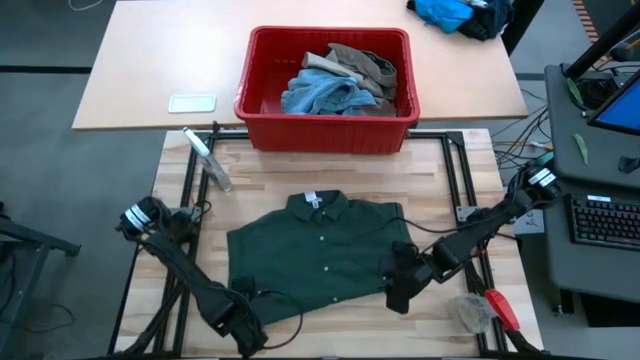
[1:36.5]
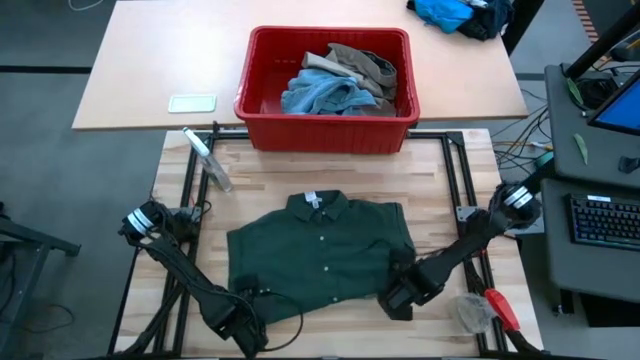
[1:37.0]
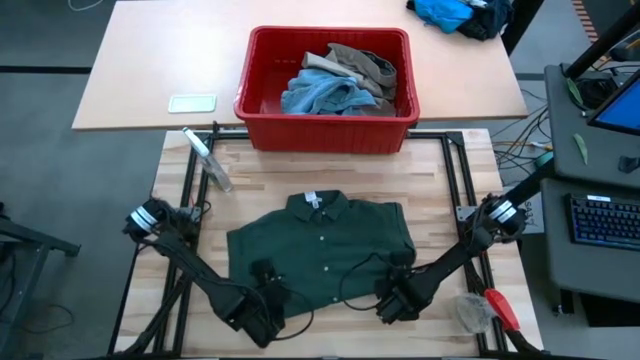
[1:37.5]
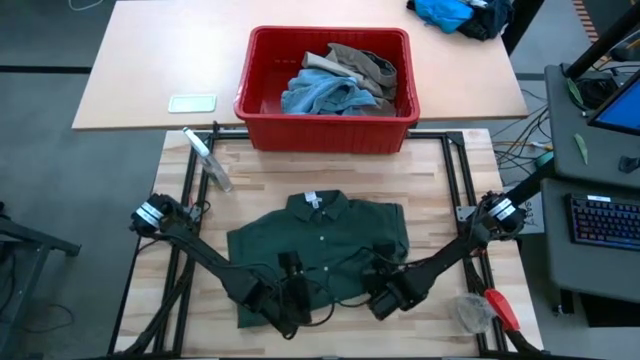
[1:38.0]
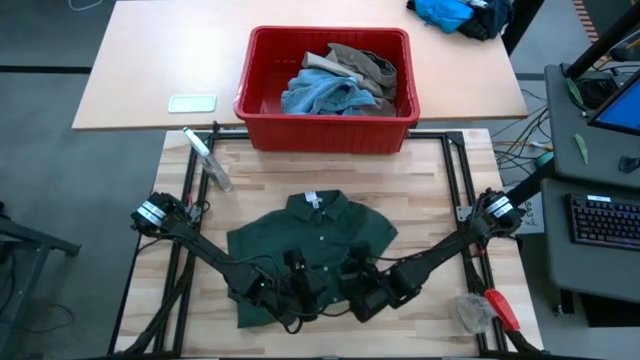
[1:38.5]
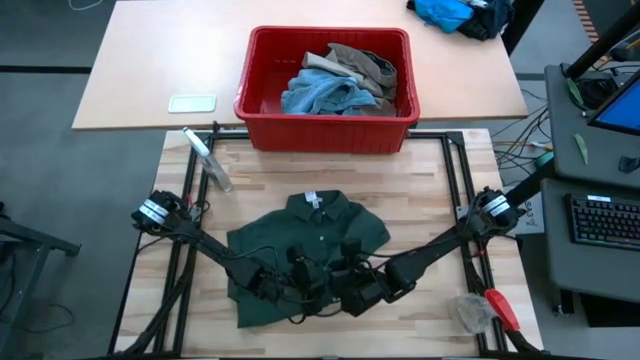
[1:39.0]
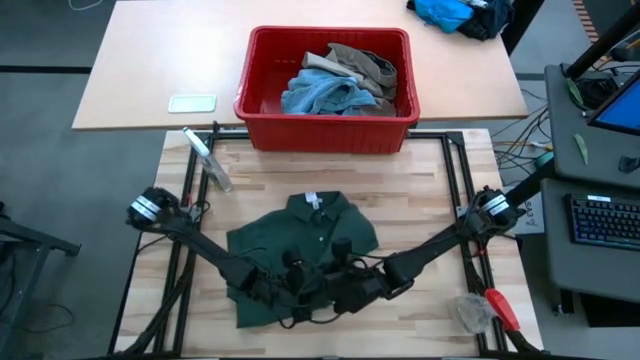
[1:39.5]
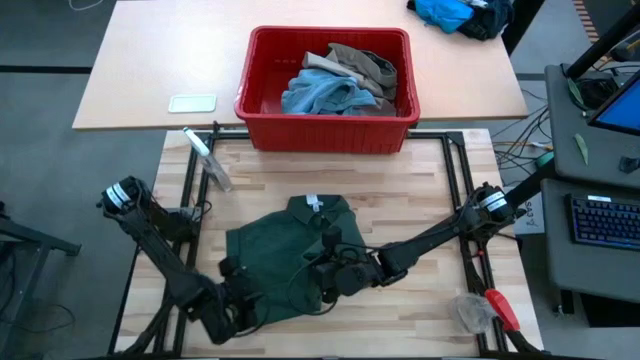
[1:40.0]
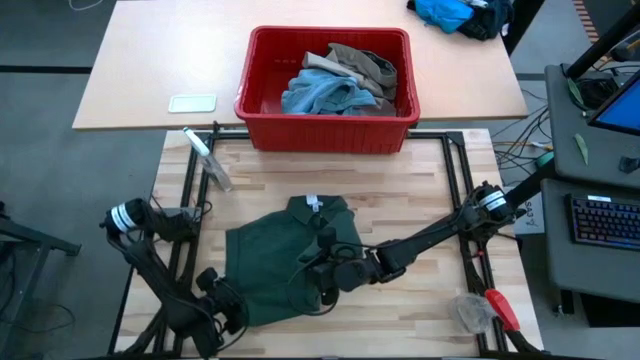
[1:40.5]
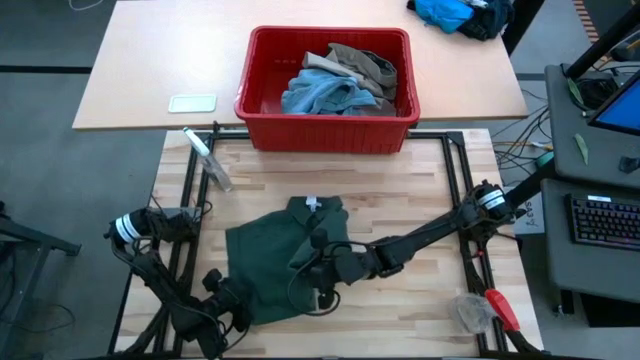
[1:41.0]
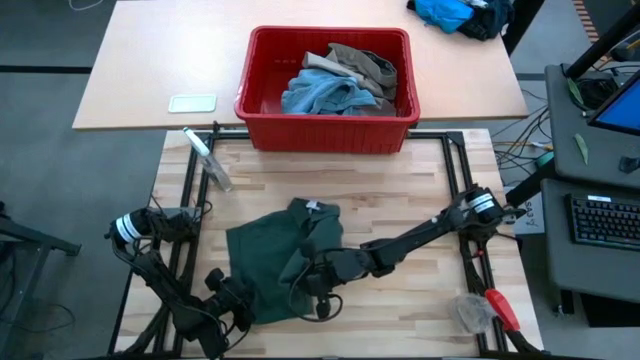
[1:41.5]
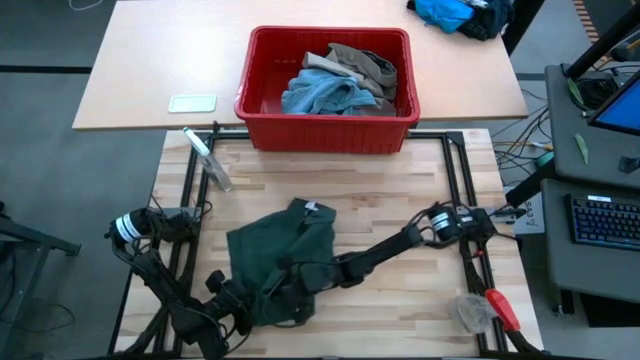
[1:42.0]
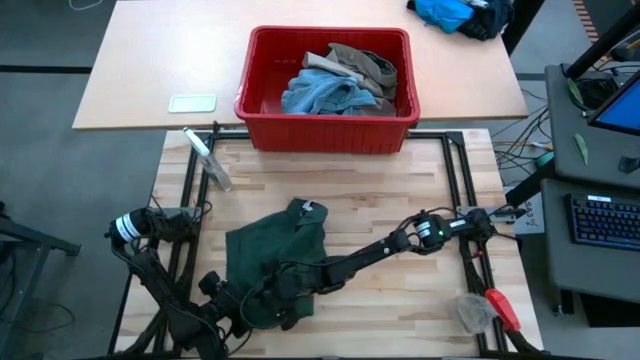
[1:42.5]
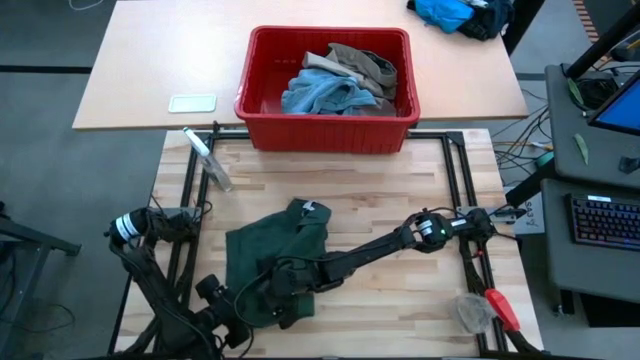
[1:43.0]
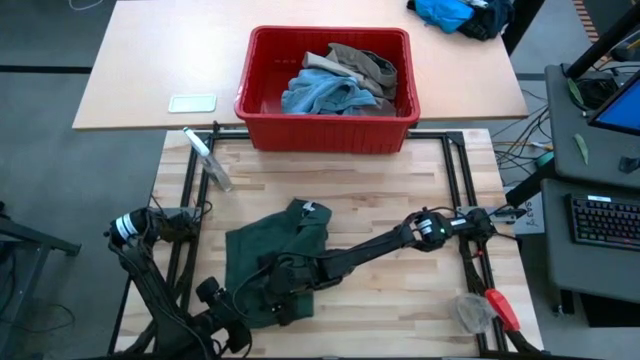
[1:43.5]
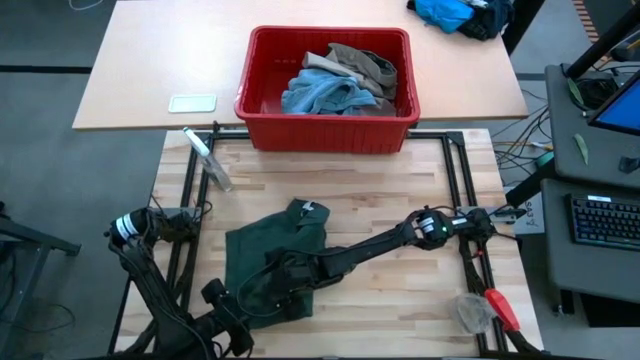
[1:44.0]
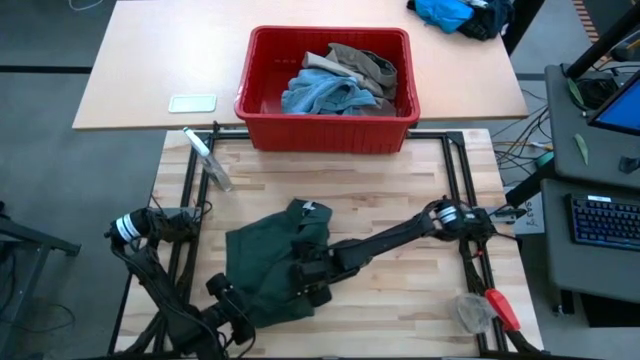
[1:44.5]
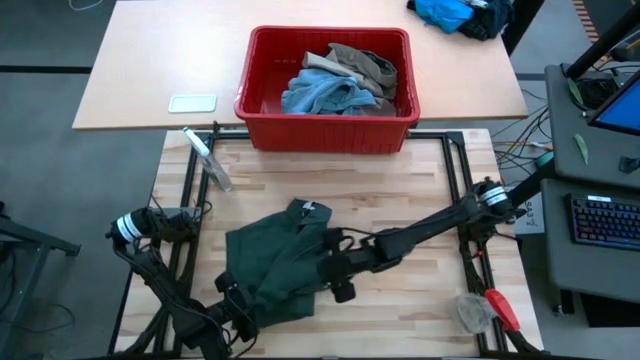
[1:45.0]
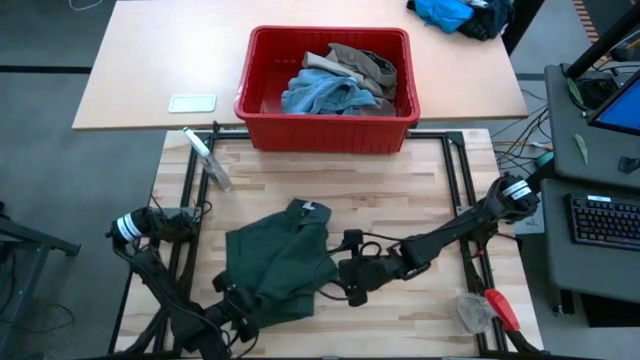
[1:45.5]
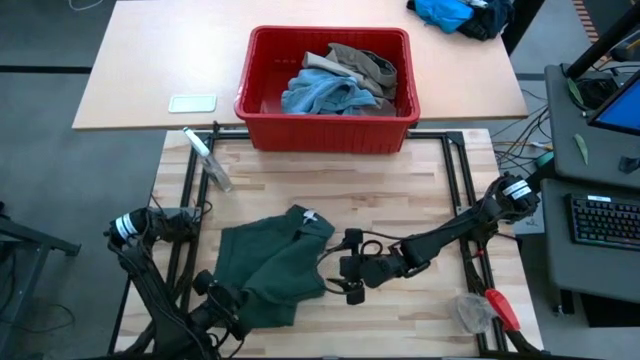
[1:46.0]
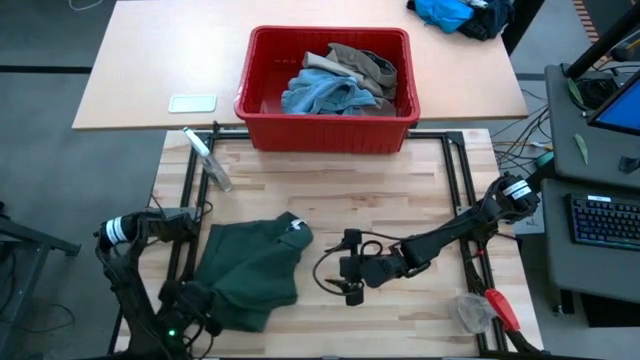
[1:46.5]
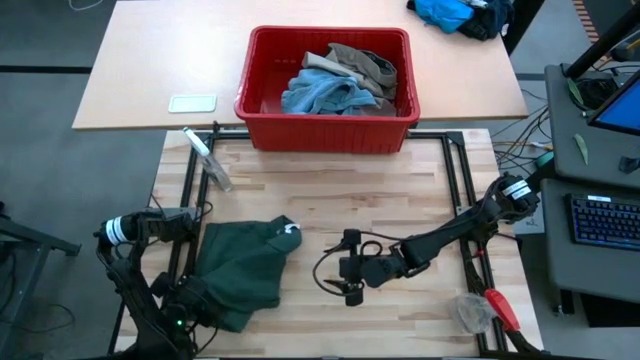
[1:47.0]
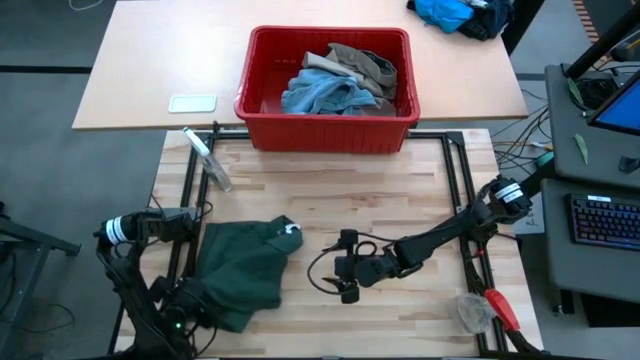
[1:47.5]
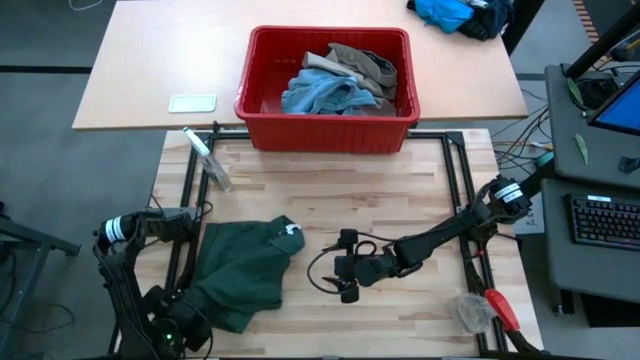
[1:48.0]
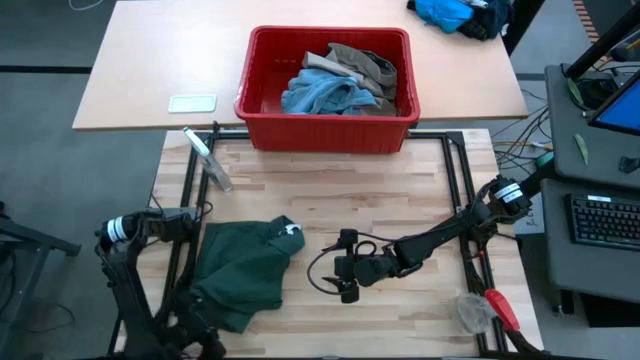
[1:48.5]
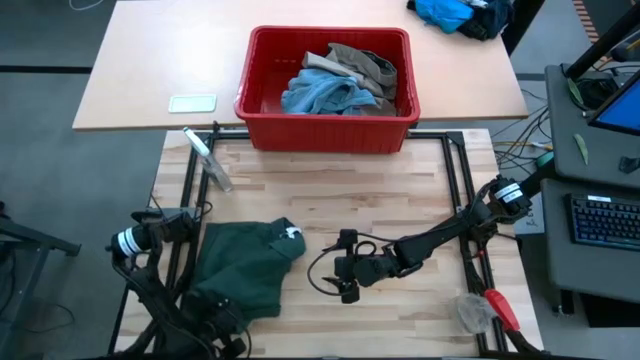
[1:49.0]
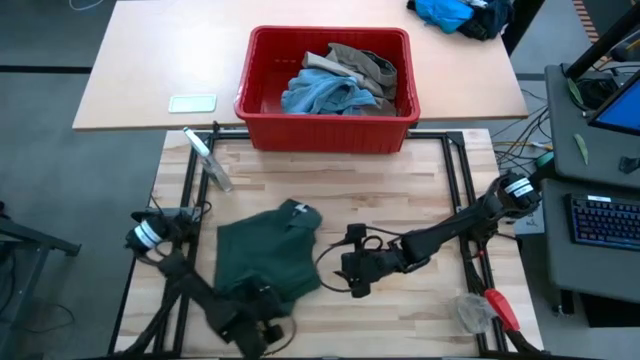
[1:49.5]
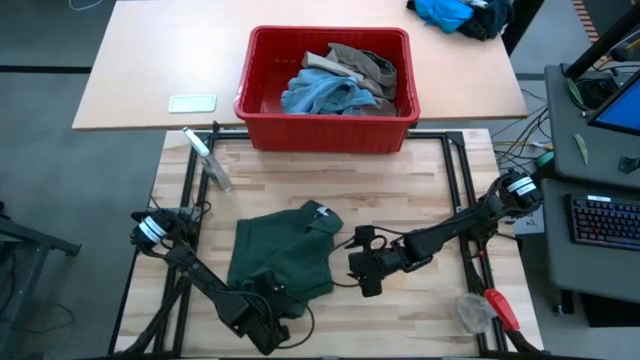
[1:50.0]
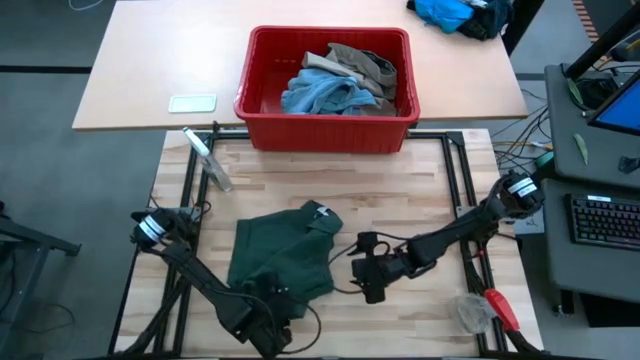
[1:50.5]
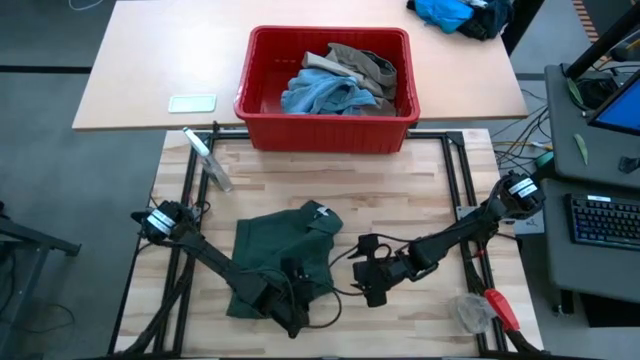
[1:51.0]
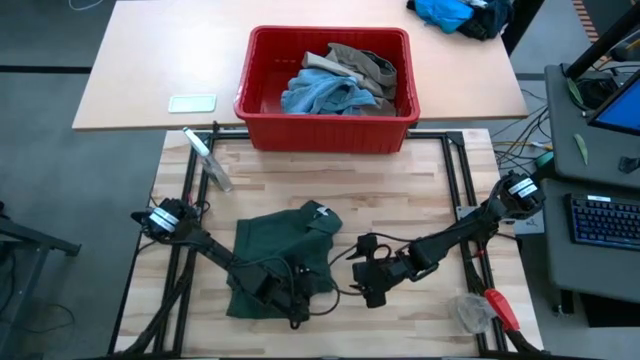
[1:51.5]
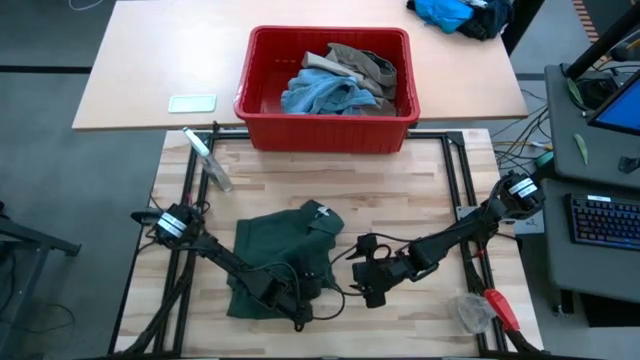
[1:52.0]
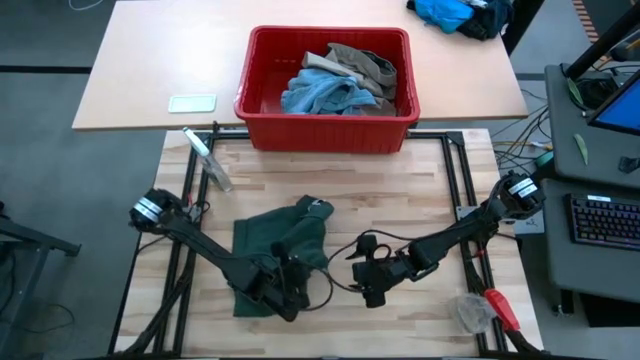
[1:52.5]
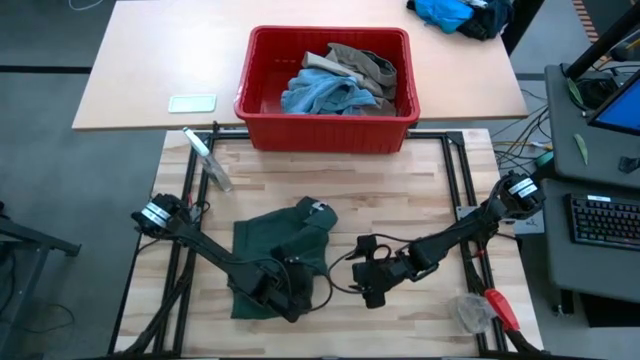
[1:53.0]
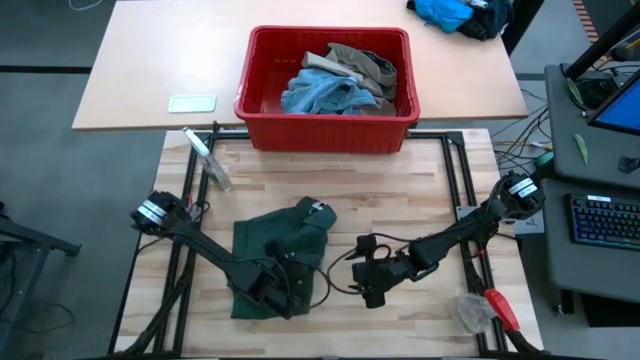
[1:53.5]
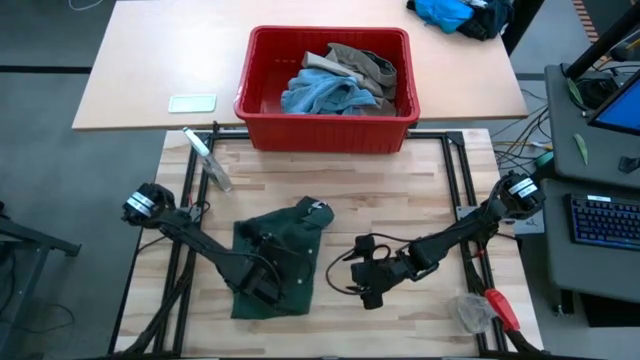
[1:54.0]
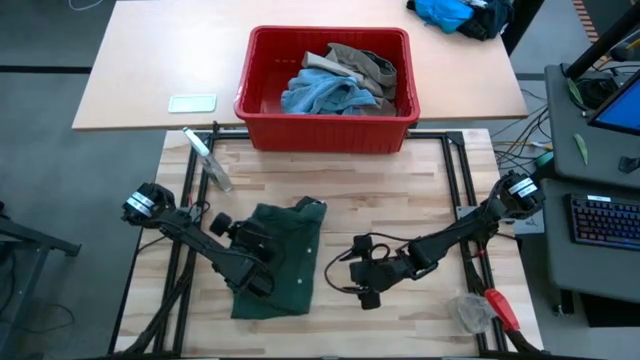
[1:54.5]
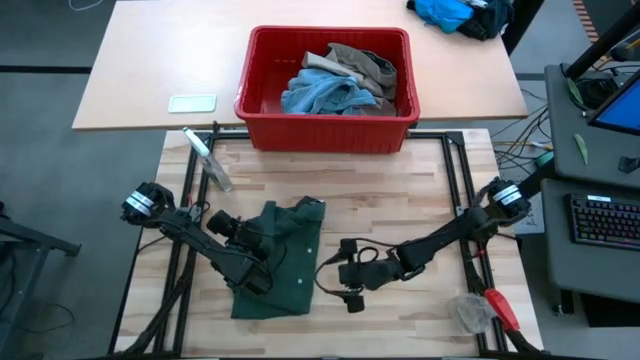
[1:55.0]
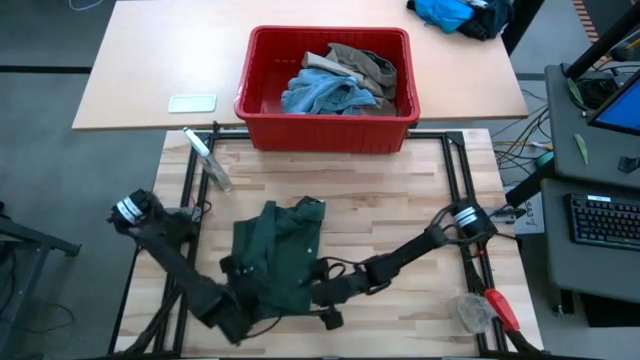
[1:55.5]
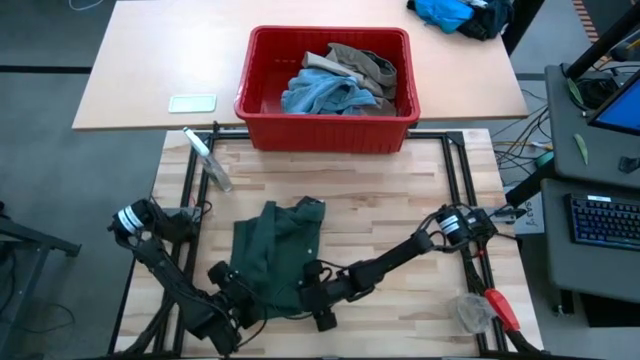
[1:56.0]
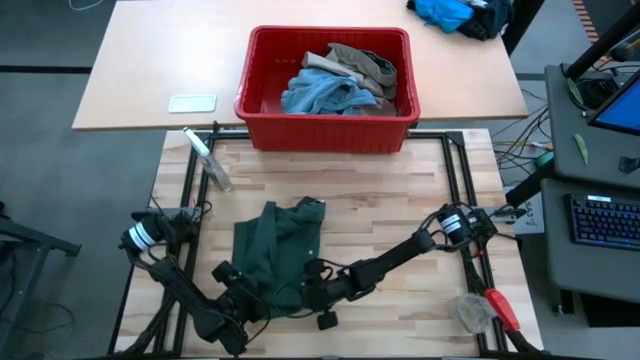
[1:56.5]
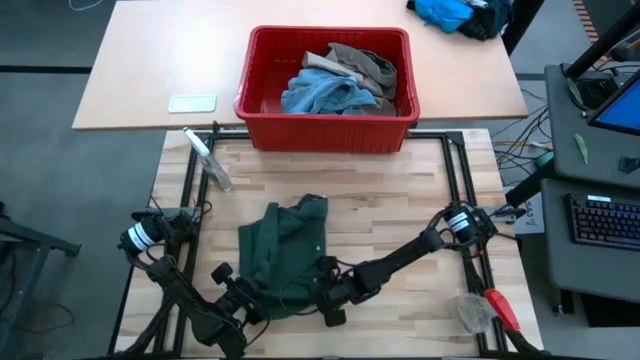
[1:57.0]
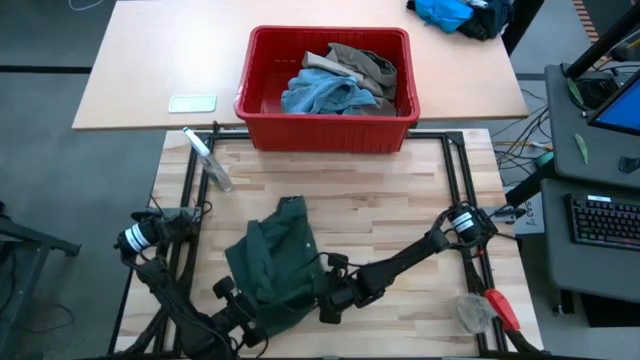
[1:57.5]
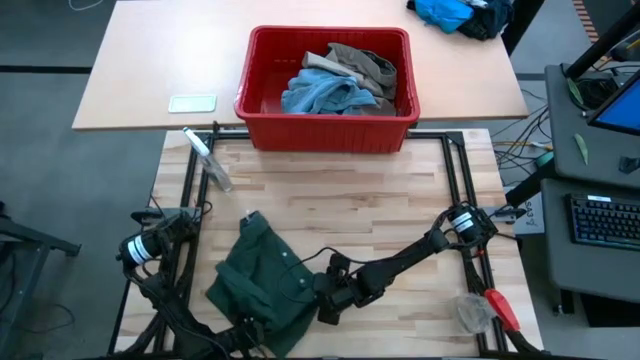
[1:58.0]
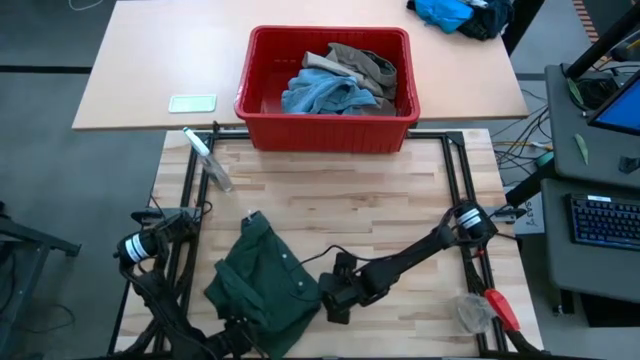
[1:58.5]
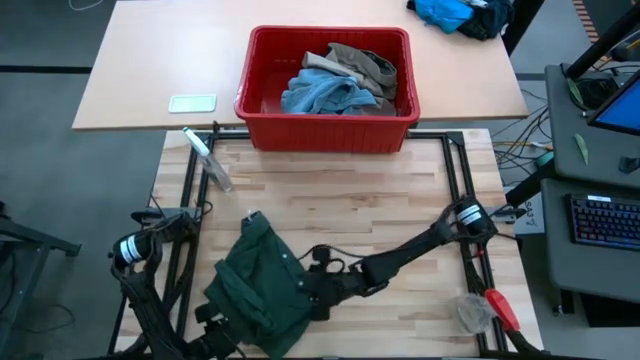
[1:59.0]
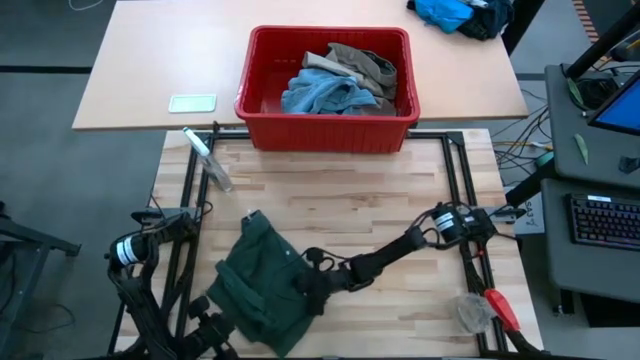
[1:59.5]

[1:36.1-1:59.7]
Task: Fold Laundry from Bin
Fold the green polo shirt
